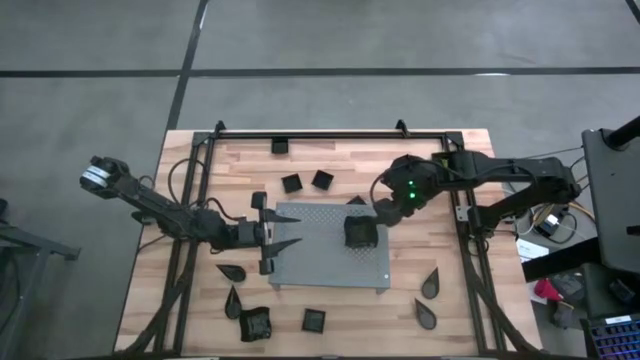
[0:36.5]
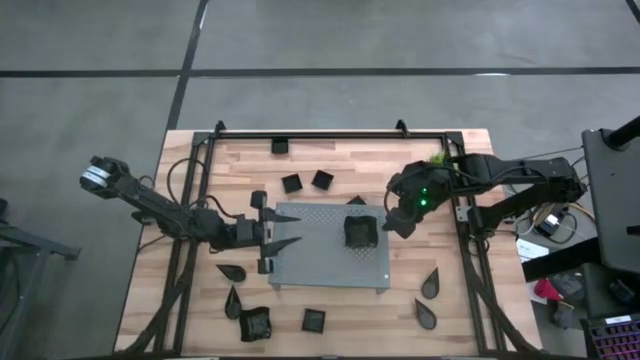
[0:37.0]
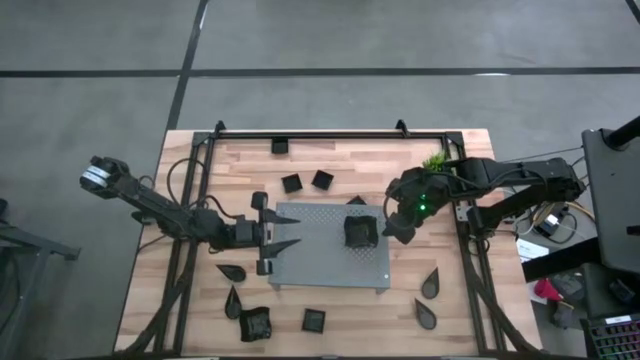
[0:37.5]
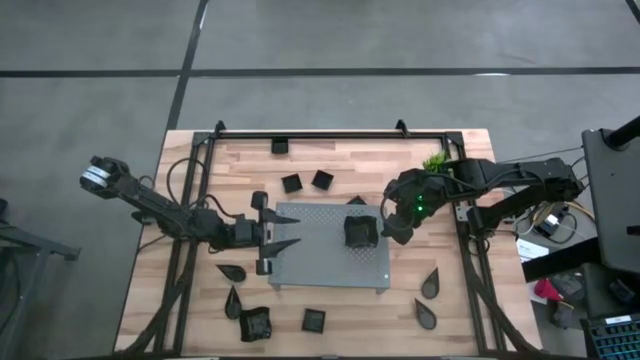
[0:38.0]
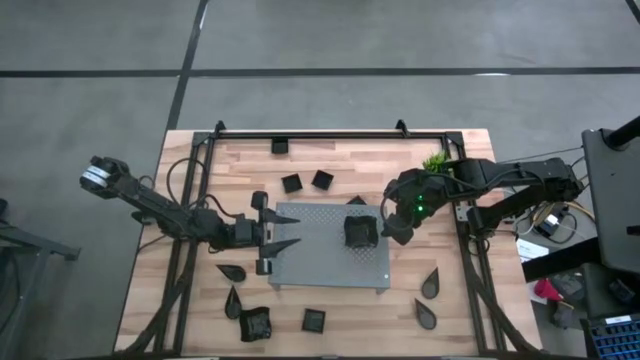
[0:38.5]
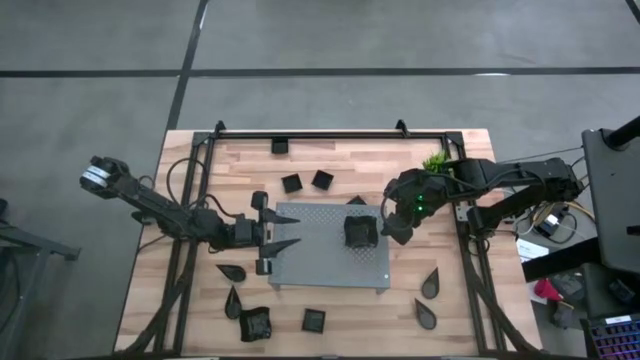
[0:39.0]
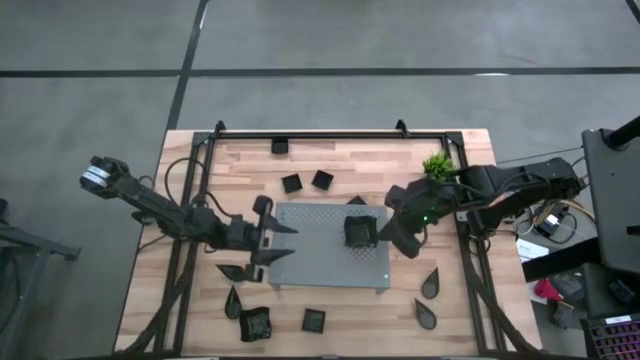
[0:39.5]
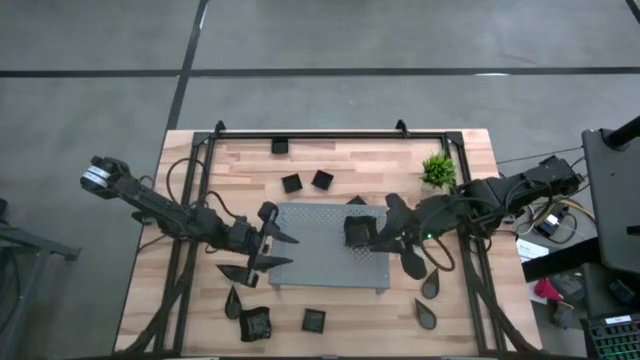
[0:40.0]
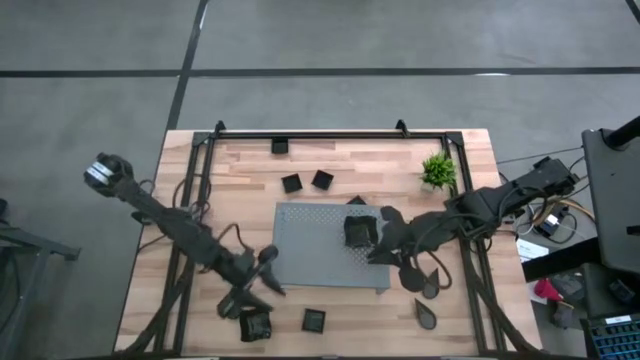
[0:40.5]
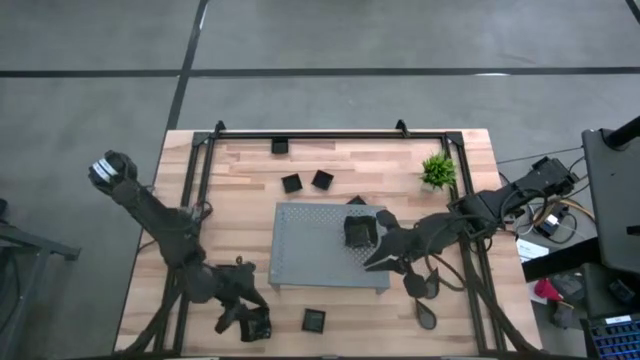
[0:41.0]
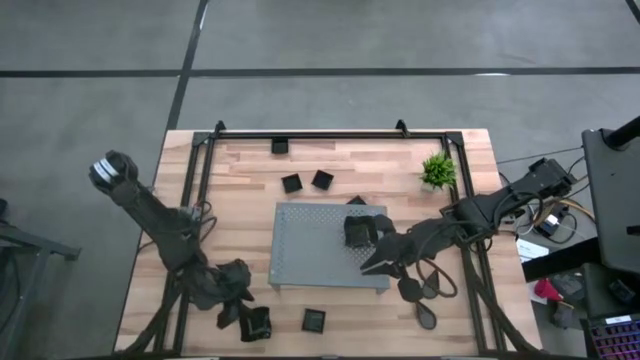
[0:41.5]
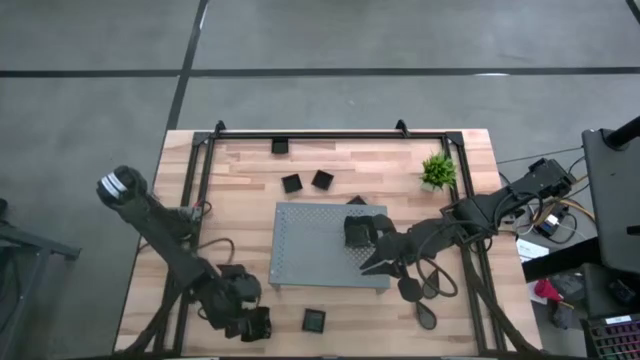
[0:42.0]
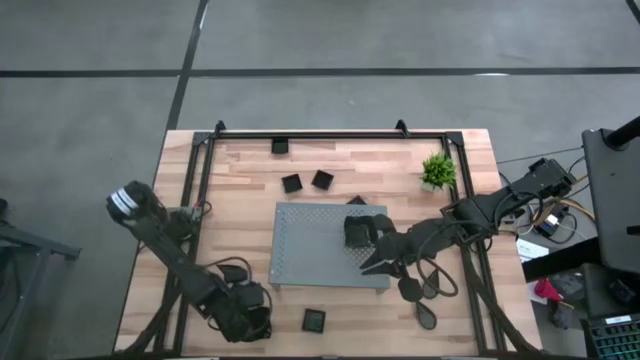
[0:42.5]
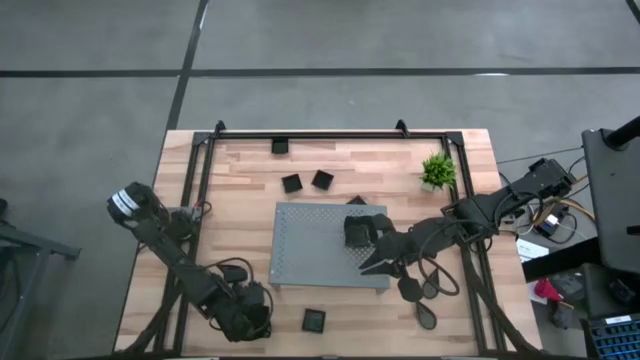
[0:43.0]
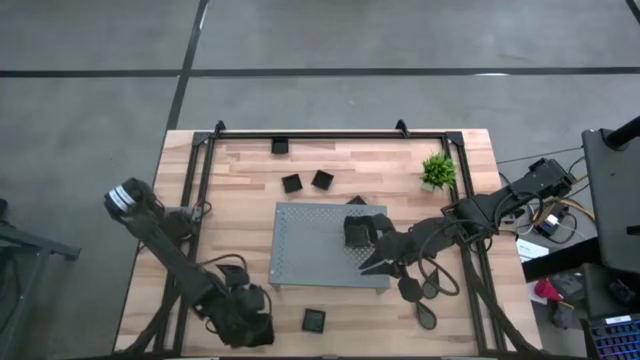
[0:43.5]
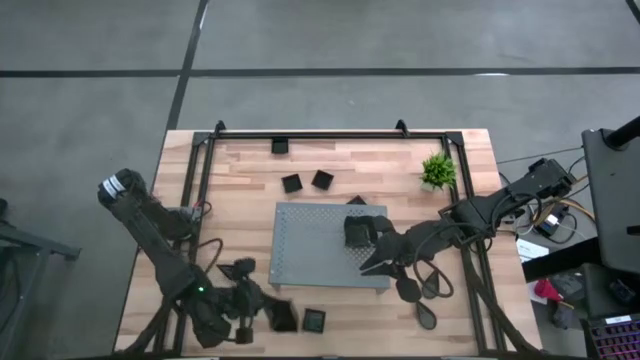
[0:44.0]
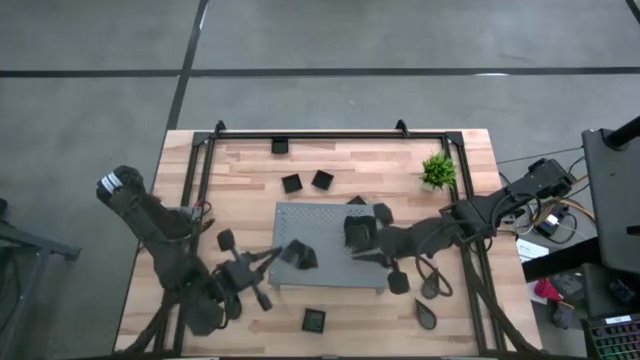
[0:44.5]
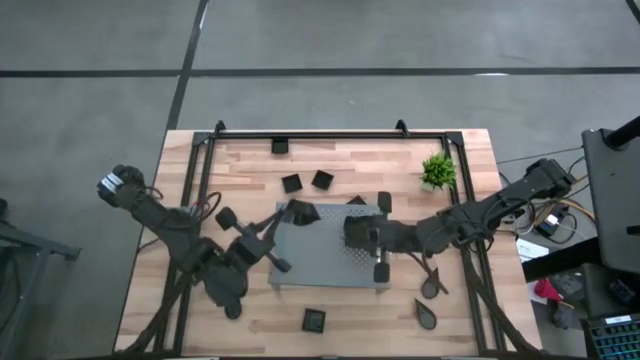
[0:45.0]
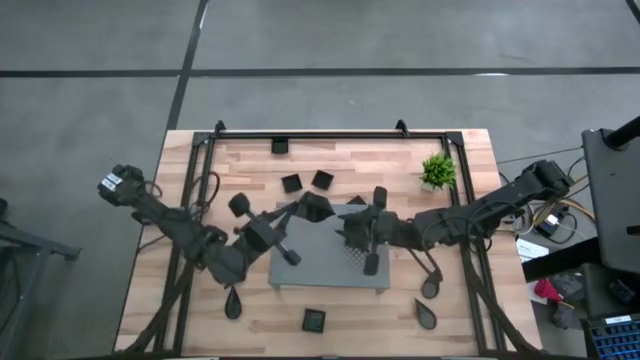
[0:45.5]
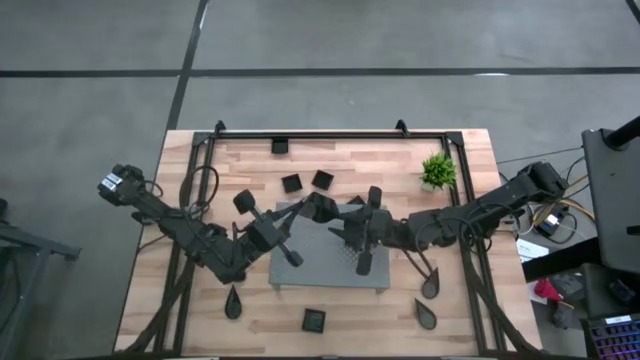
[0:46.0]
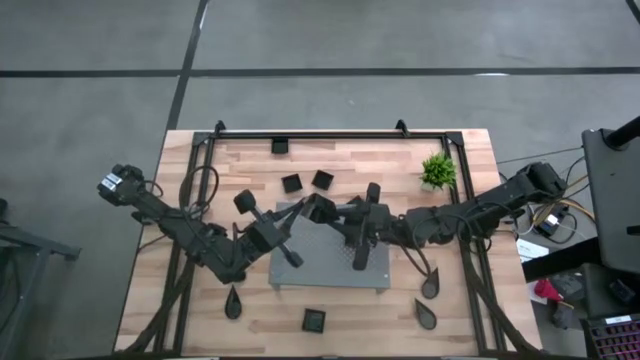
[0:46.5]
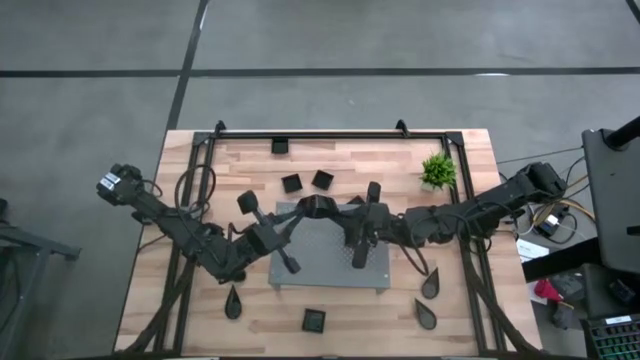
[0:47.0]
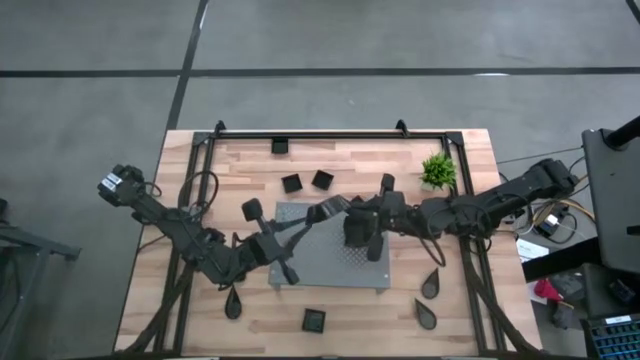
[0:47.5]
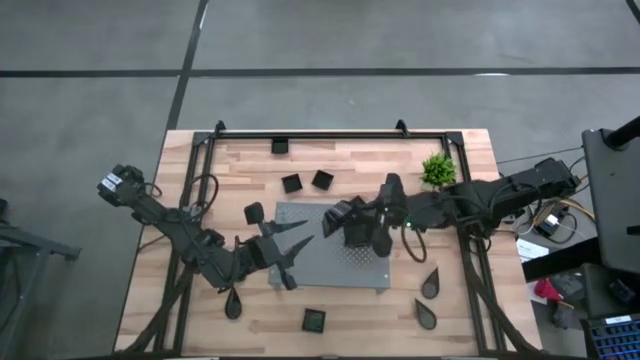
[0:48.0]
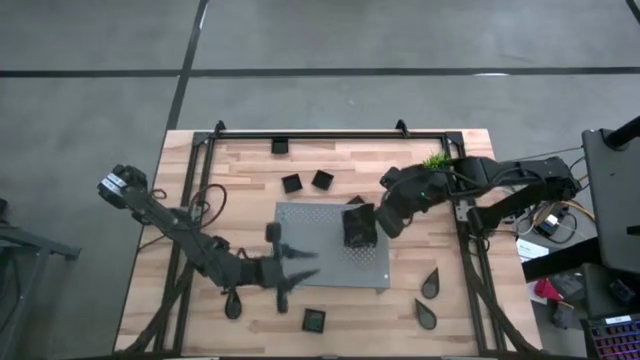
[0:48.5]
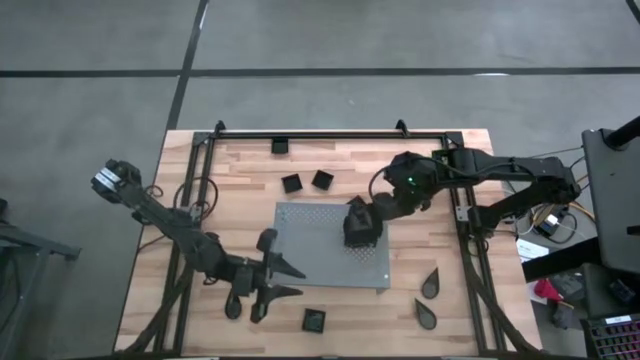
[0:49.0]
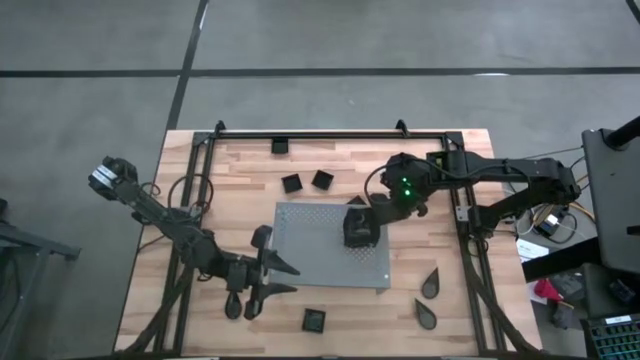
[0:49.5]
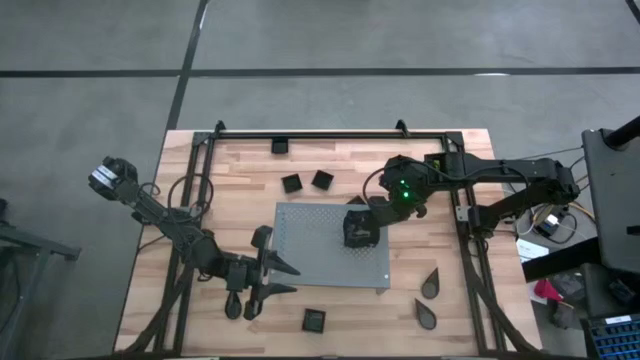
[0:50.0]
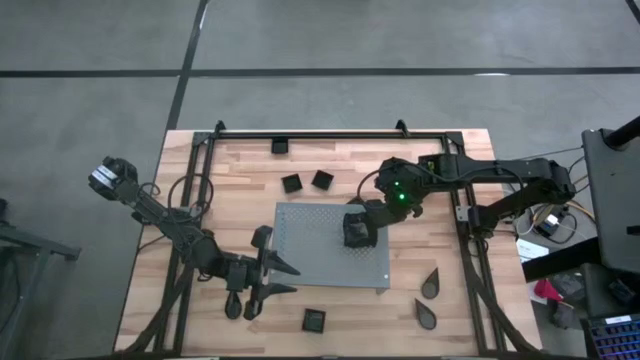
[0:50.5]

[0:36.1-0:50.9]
Task: Pick & Place Mini shaped plates
Stack the black distorted square plate on top of the black distorted square plate on the shelf

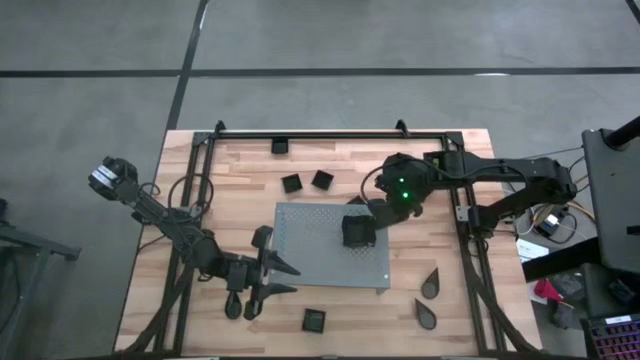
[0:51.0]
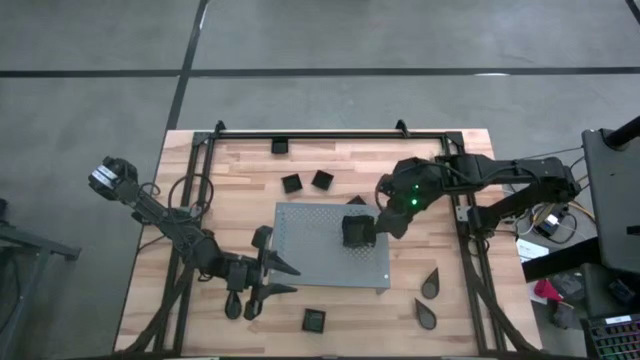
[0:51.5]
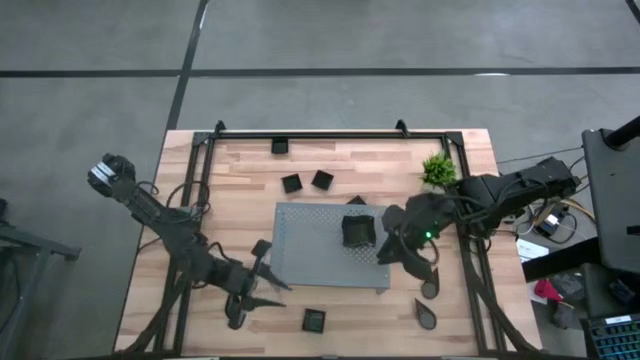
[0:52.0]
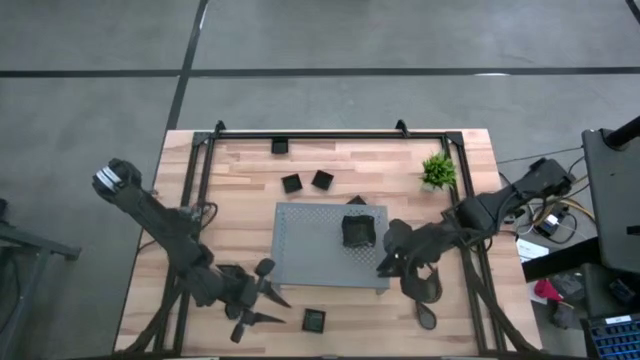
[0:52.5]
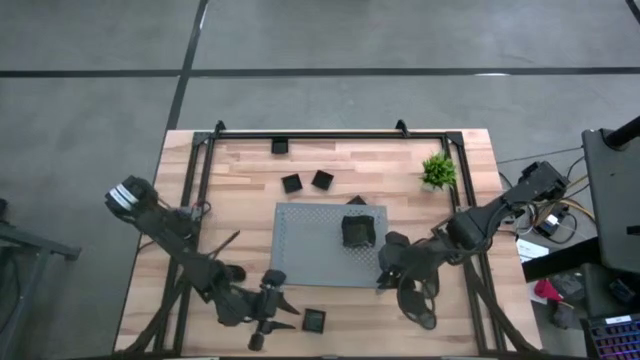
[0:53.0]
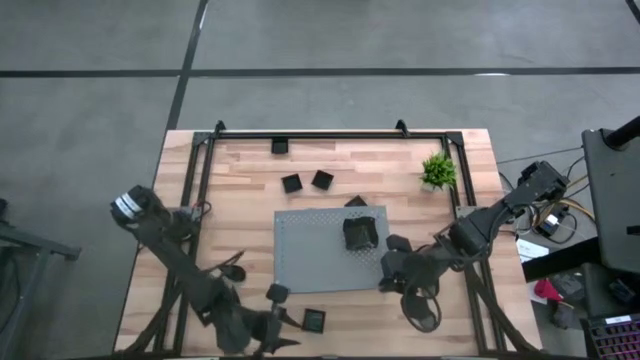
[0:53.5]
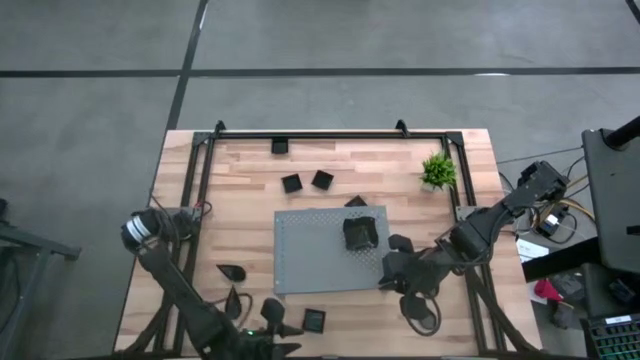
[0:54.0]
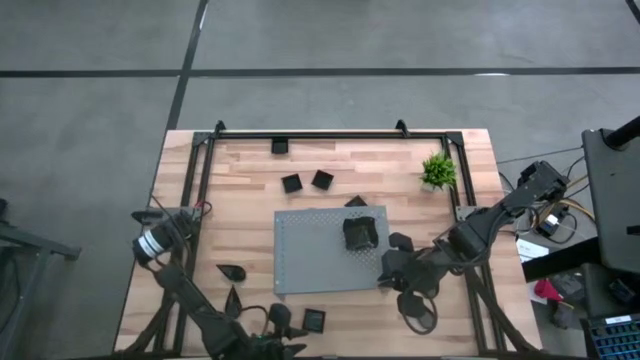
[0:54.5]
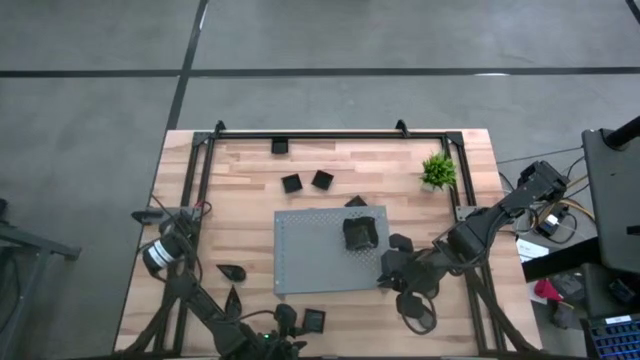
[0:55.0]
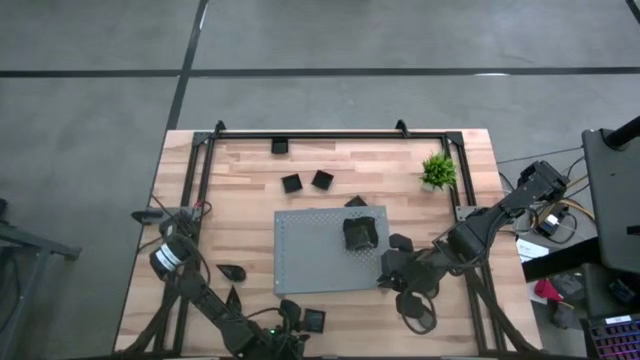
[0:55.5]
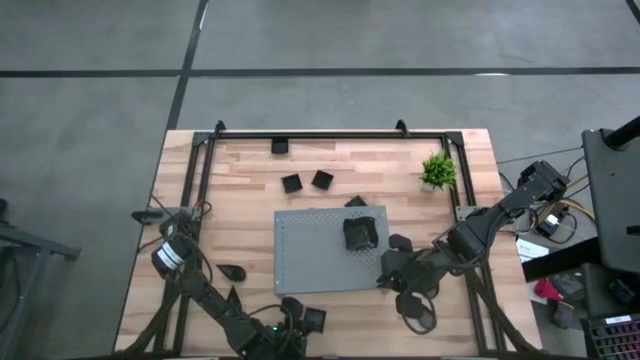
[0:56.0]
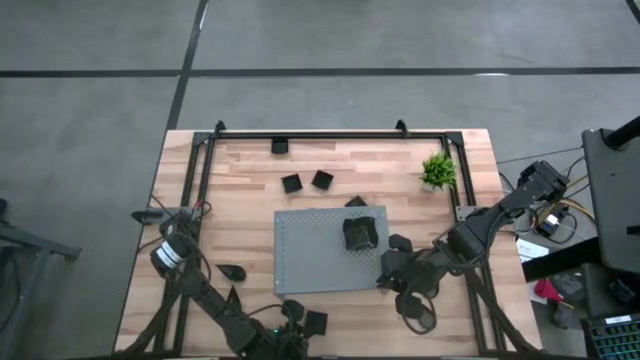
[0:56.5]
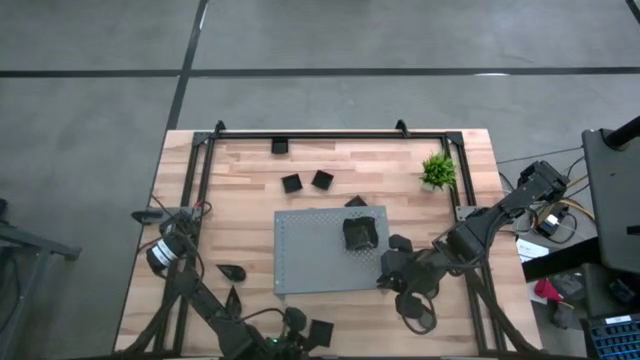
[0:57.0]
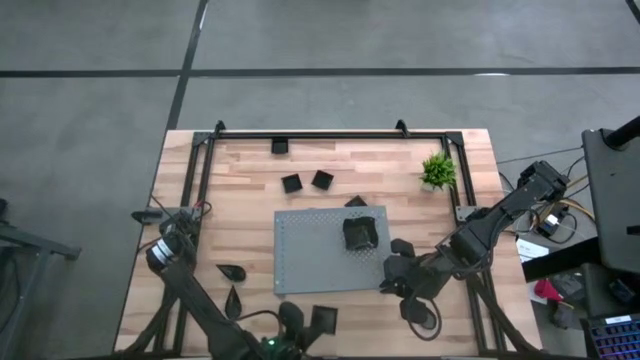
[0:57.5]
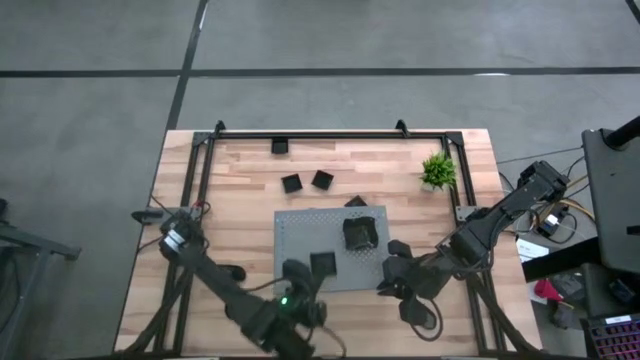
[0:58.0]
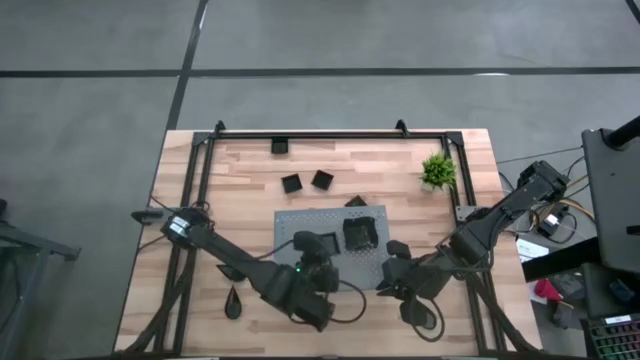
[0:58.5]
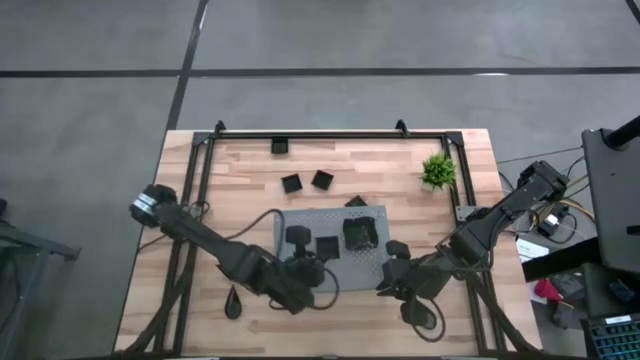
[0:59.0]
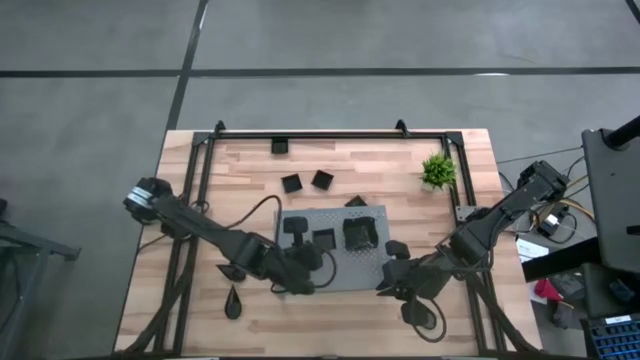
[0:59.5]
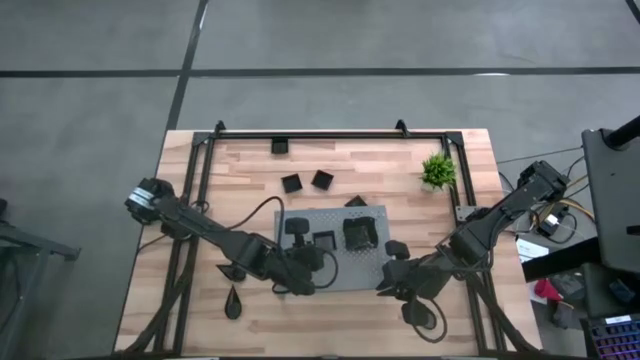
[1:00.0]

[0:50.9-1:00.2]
Put the square plate on the shelf
